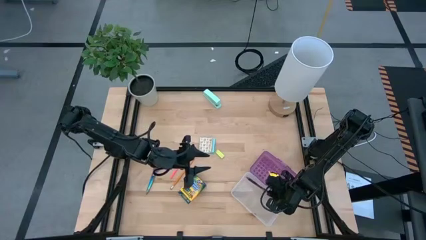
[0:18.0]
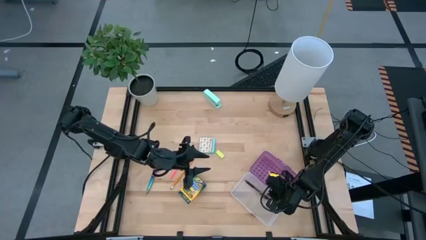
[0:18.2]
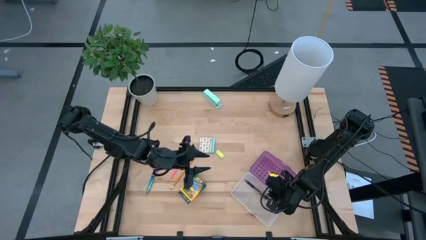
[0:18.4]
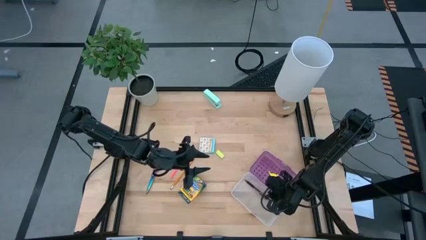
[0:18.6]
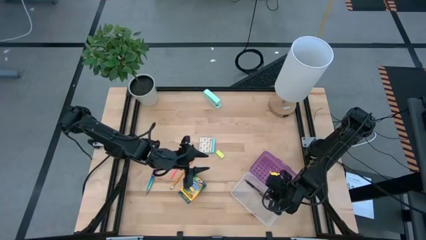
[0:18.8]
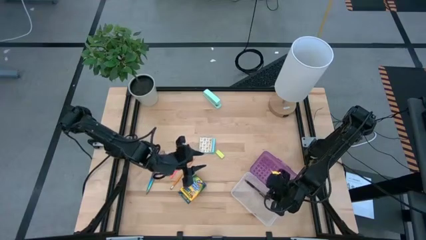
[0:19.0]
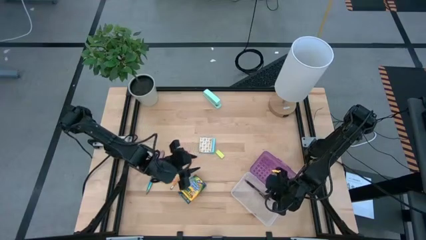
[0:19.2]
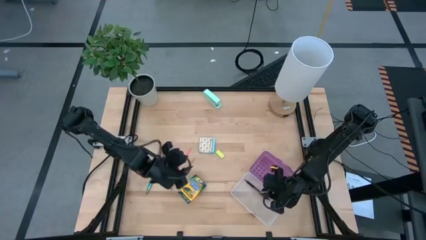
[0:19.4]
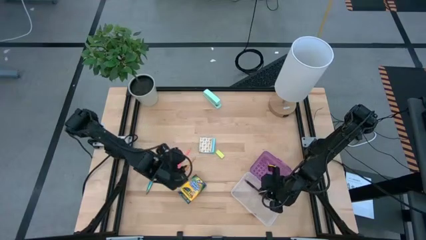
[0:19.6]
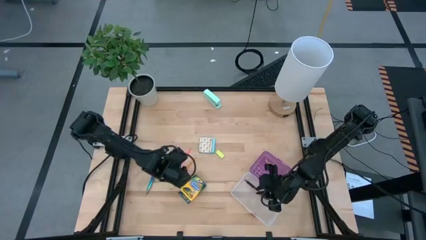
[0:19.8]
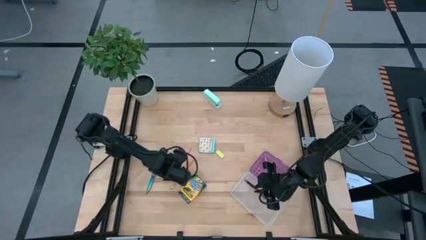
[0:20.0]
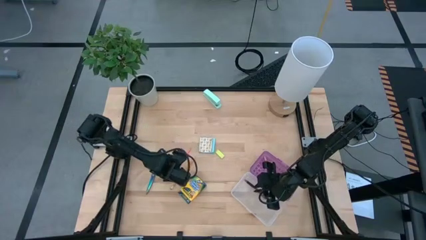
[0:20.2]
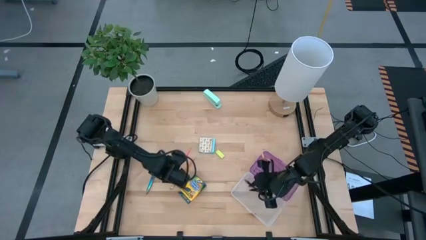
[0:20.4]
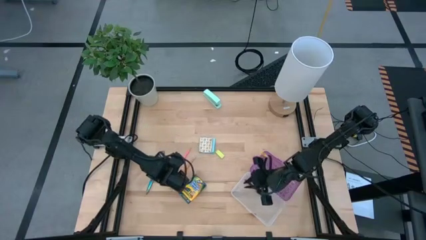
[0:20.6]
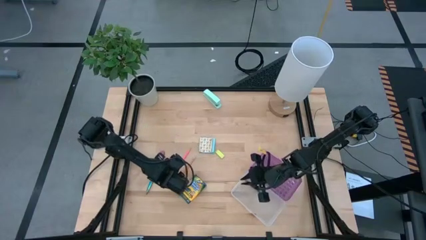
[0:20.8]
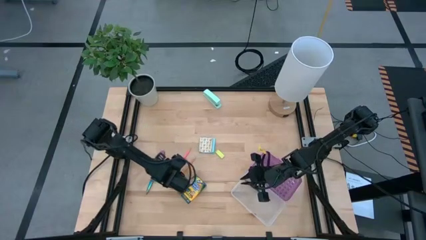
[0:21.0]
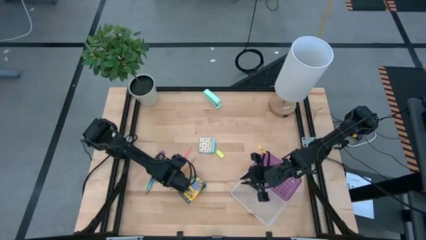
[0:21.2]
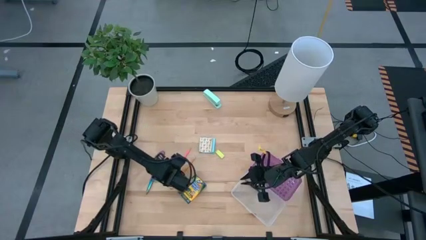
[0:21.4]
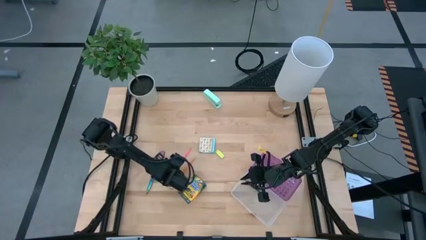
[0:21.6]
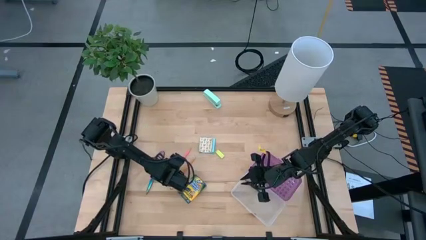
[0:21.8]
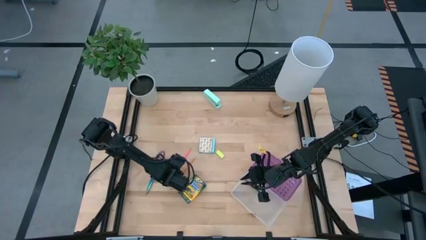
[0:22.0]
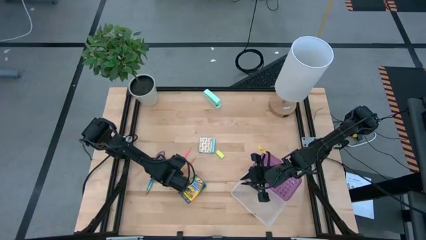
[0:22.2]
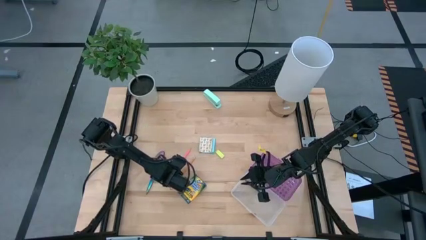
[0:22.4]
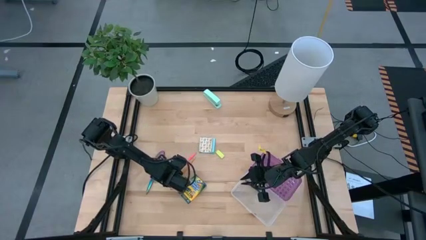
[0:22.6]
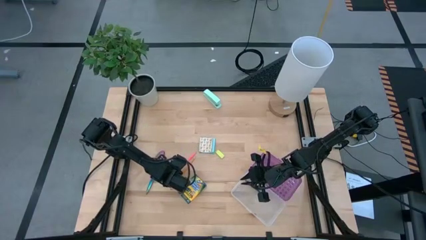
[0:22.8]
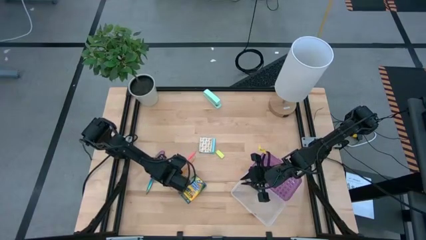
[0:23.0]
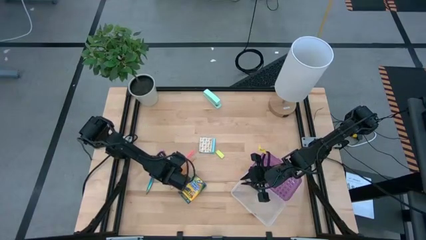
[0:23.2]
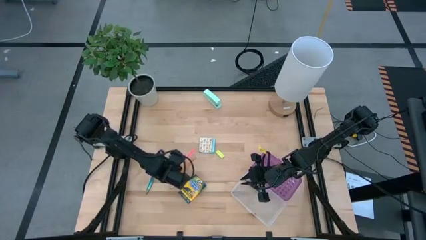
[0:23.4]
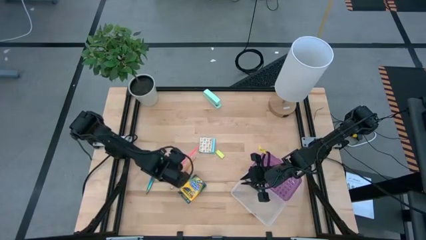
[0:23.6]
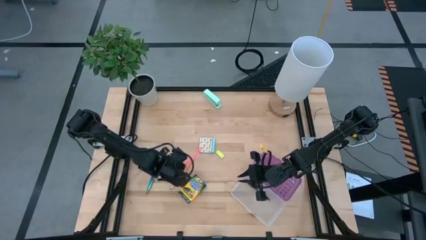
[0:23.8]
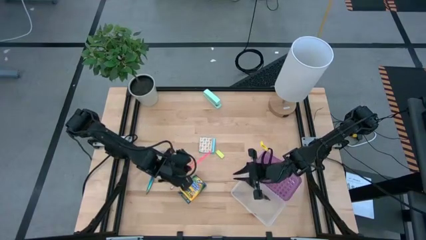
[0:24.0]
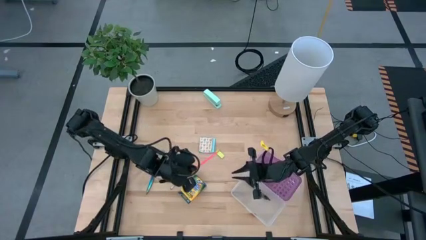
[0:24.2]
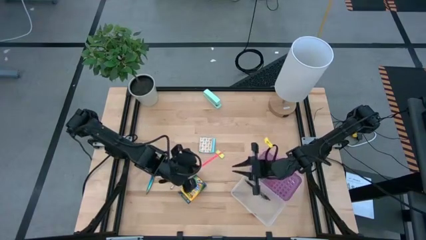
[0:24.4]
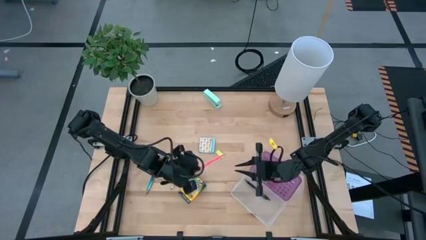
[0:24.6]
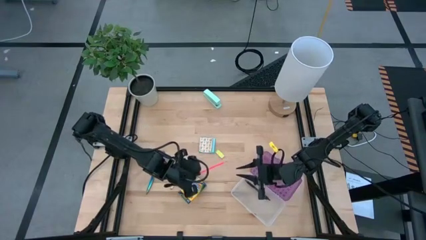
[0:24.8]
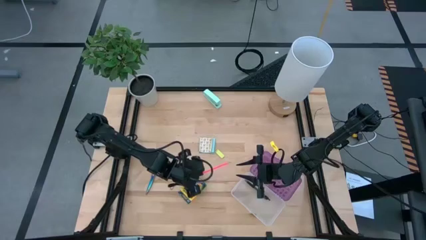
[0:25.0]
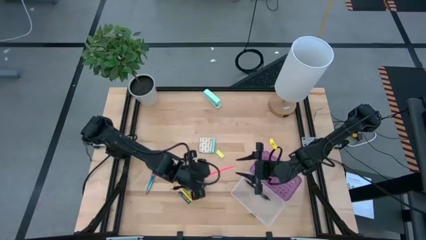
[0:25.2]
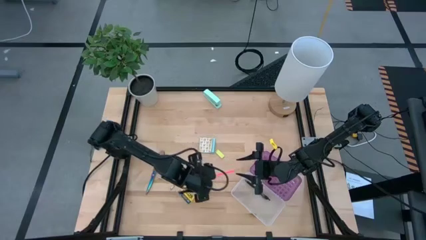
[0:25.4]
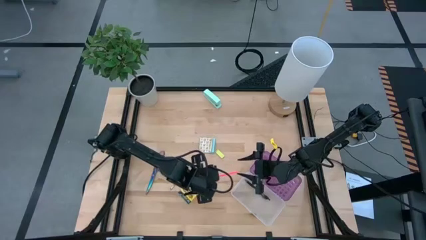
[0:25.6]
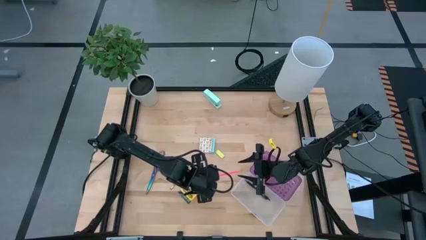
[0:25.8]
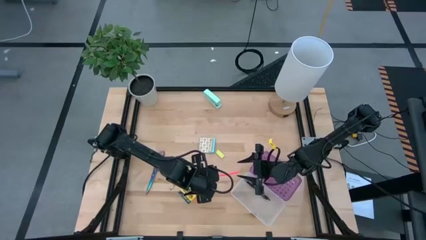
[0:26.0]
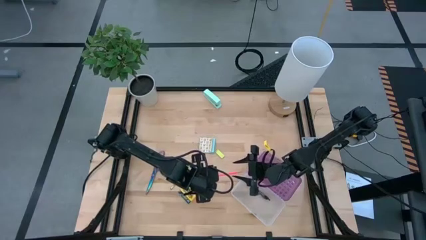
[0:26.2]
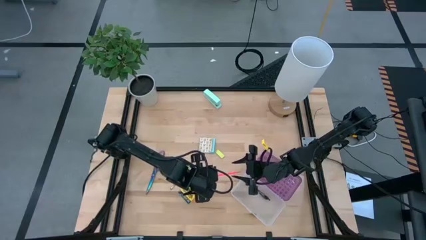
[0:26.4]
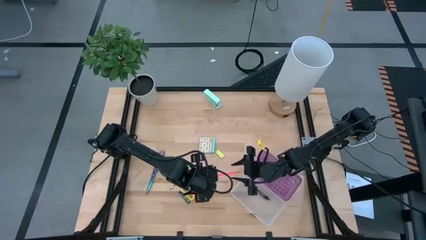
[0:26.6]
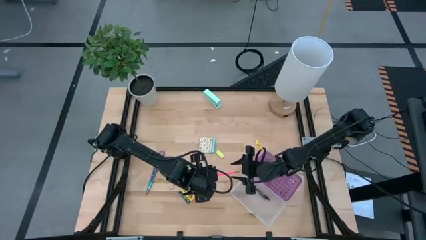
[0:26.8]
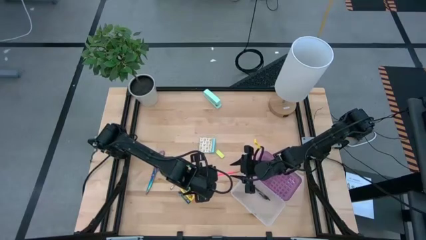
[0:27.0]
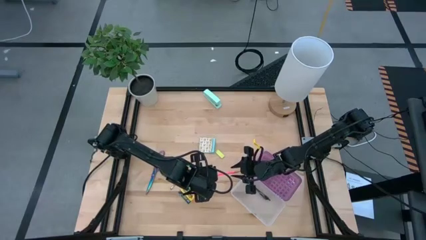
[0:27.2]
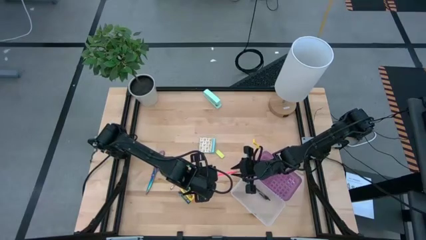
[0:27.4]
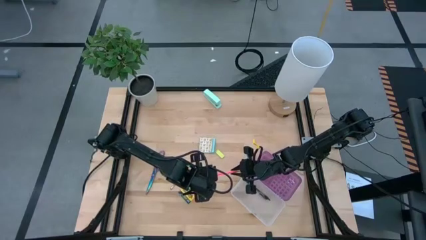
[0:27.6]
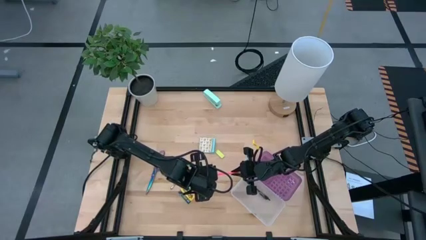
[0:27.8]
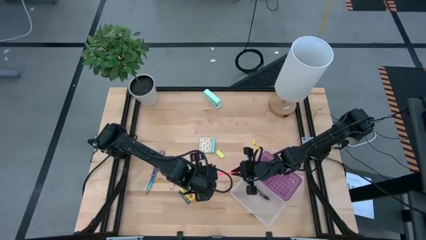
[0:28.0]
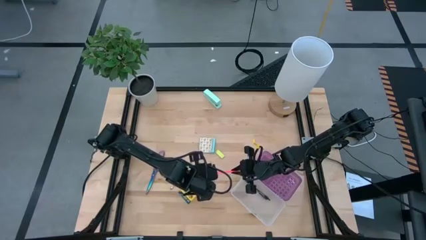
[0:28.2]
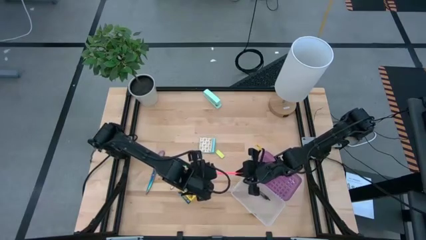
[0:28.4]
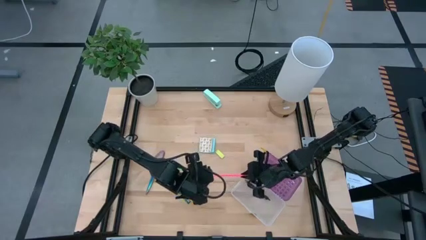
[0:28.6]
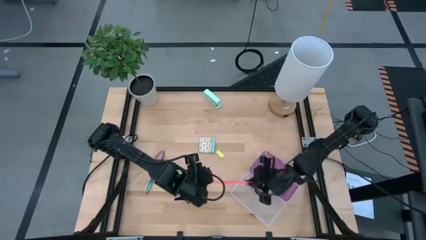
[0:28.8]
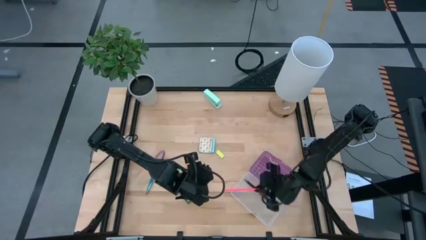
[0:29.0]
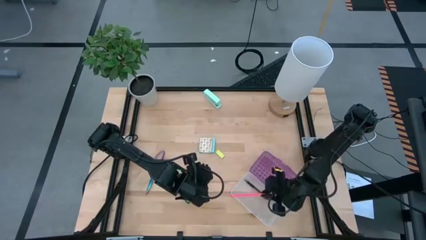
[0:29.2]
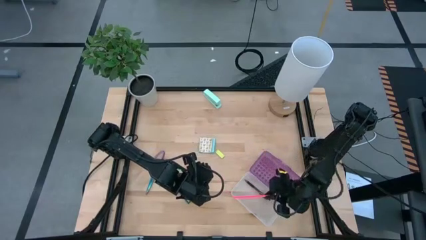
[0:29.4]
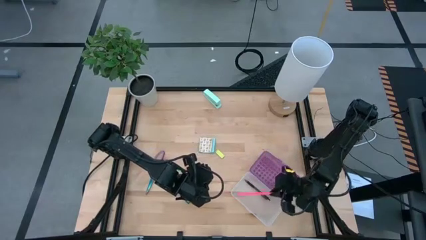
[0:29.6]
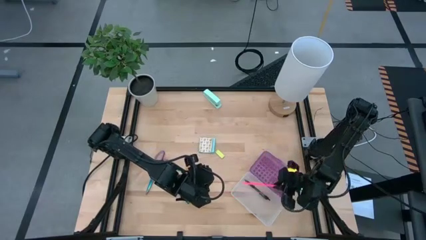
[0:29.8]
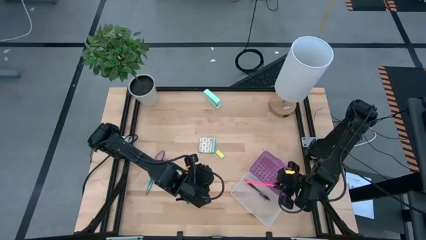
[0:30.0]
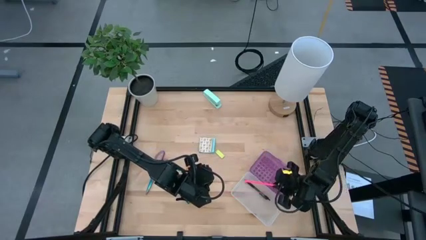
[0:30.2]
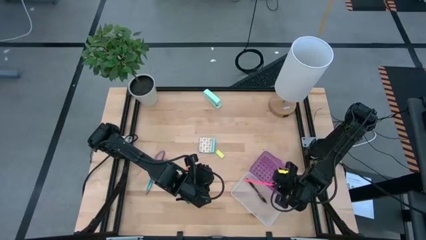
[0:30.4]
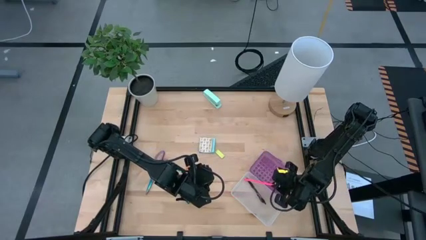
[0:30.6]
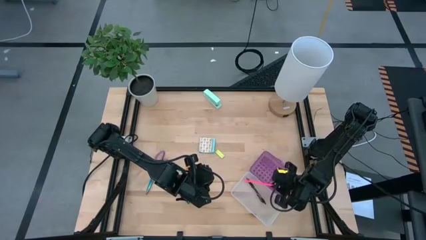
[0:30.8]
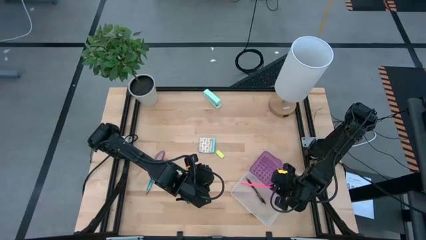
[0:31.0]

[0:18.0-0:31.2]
Task: Pack school essentials
Put the pink pencil into the violet supply box

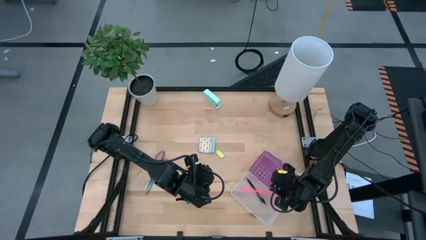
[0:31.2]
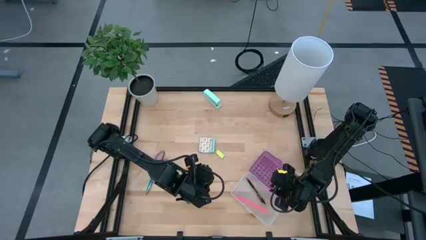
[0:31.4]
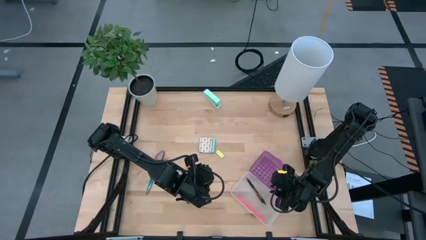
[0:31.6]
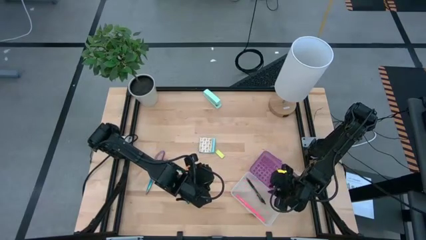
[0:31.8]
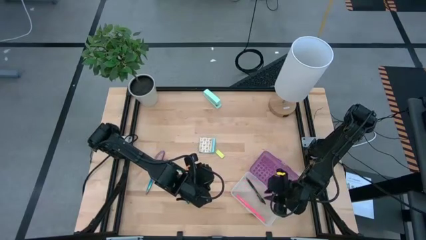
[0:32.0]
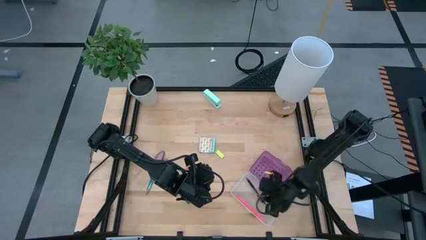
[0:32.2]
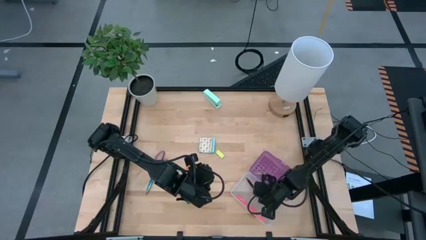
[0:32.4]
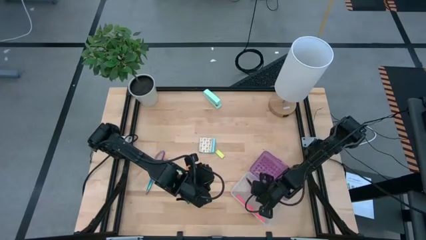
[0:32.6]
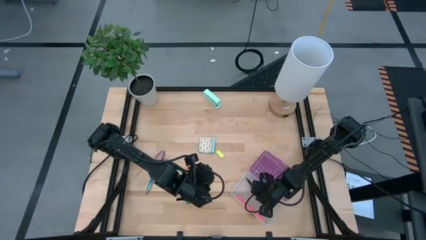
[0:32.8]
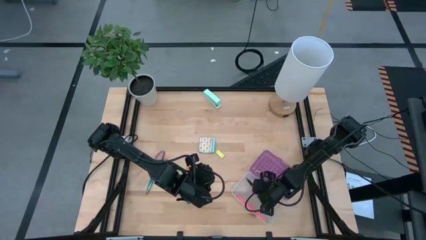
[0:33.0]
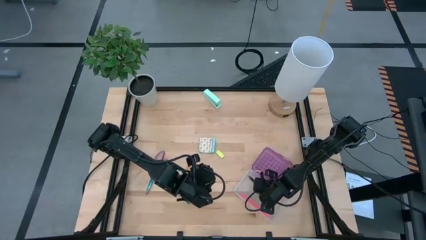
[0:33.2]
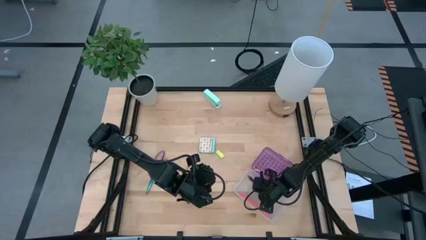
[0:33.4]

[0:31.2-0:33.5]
Adjust the violet supply box
